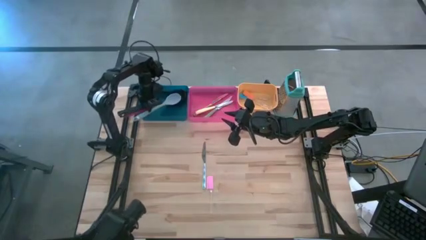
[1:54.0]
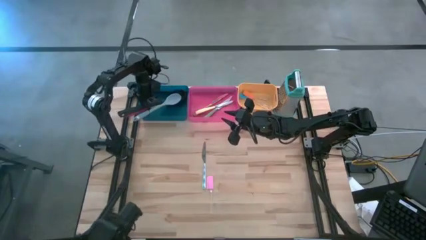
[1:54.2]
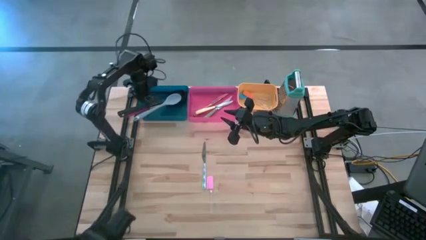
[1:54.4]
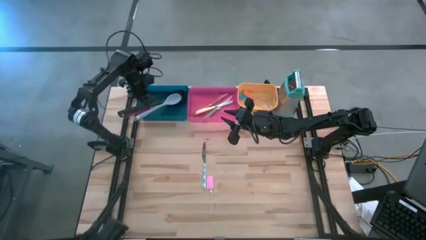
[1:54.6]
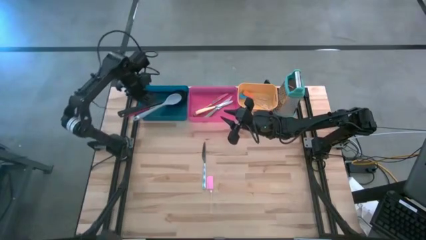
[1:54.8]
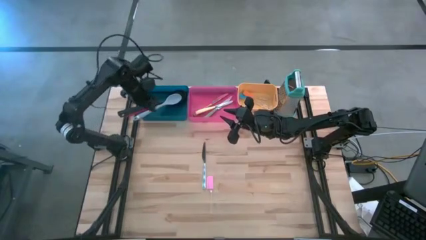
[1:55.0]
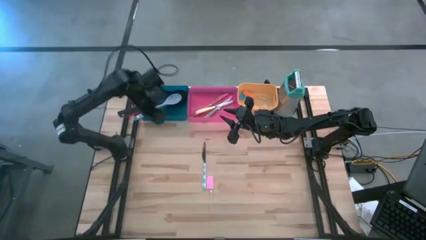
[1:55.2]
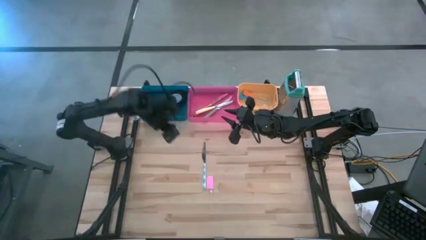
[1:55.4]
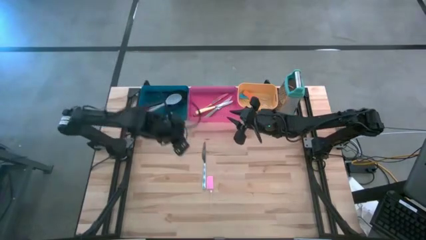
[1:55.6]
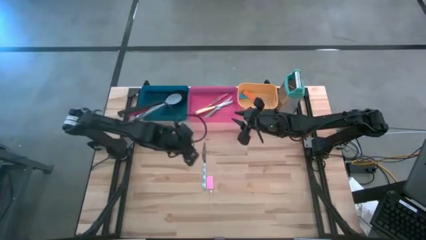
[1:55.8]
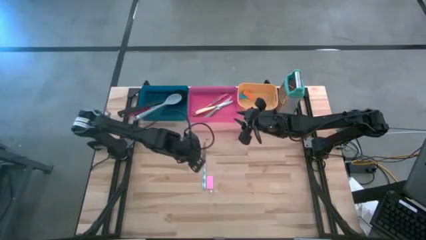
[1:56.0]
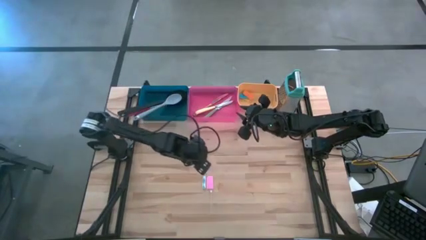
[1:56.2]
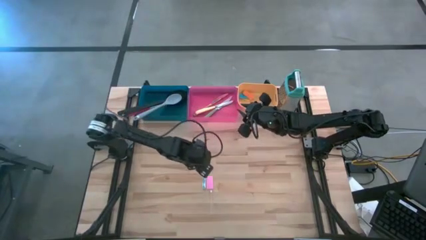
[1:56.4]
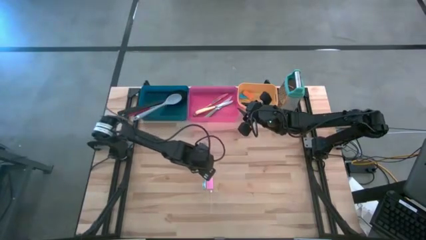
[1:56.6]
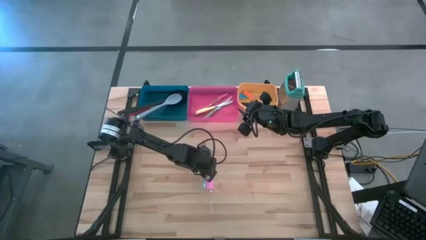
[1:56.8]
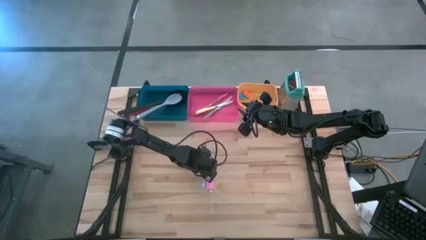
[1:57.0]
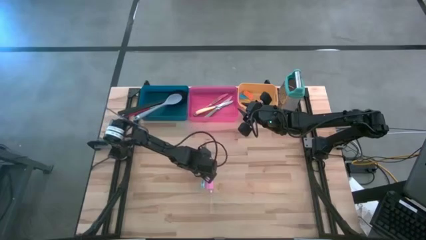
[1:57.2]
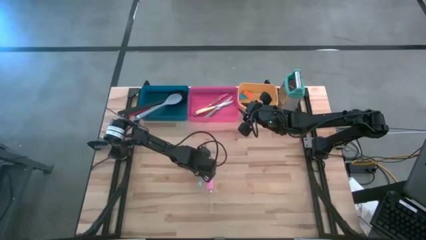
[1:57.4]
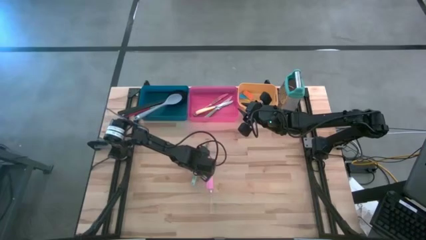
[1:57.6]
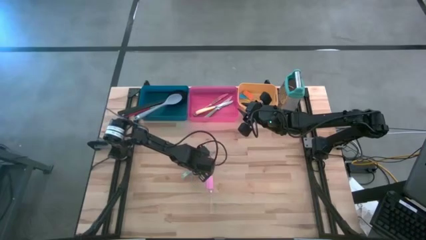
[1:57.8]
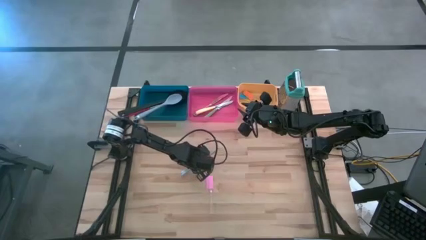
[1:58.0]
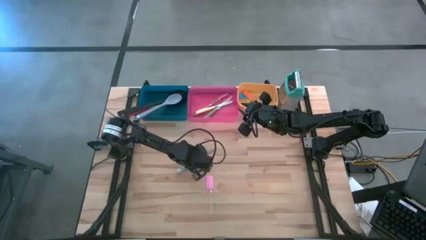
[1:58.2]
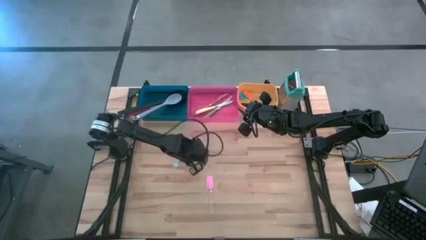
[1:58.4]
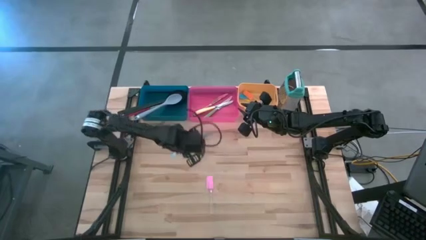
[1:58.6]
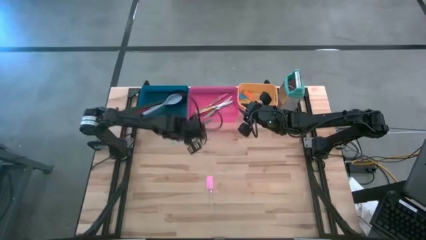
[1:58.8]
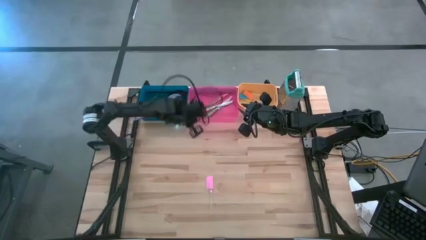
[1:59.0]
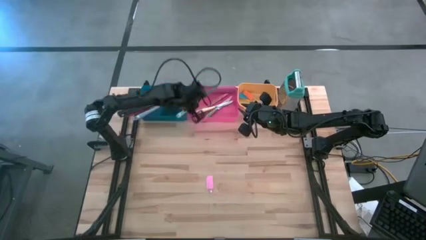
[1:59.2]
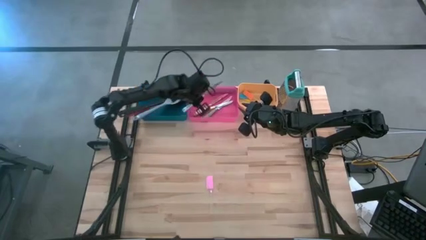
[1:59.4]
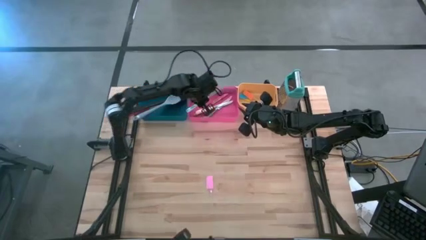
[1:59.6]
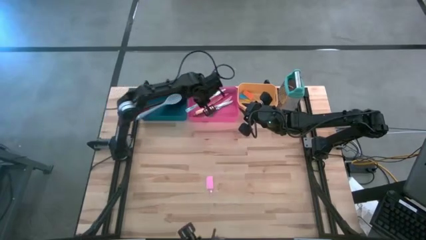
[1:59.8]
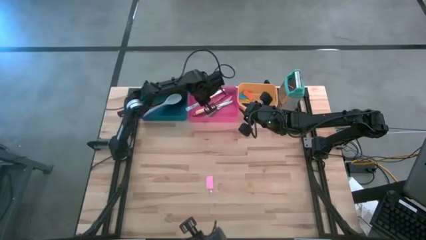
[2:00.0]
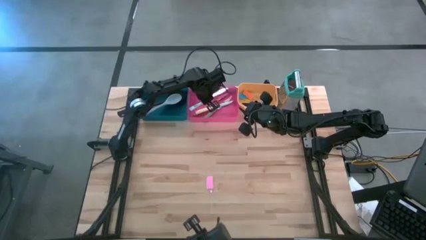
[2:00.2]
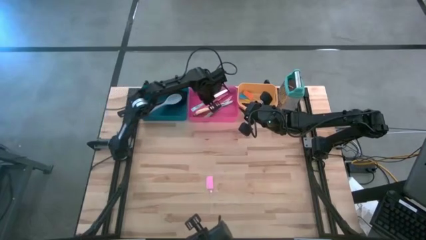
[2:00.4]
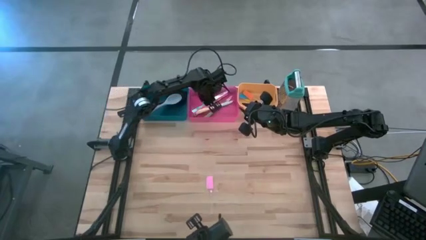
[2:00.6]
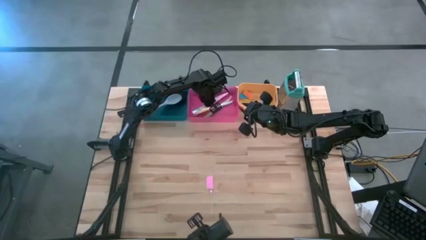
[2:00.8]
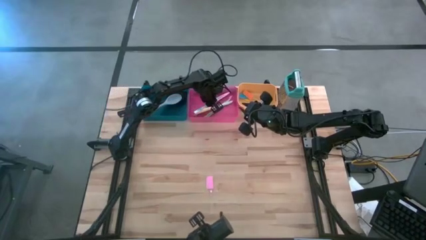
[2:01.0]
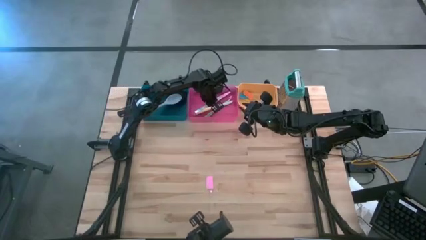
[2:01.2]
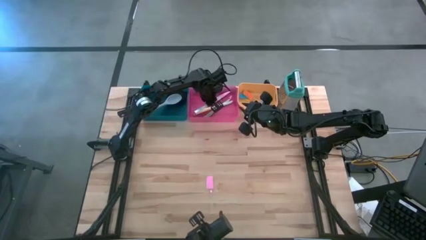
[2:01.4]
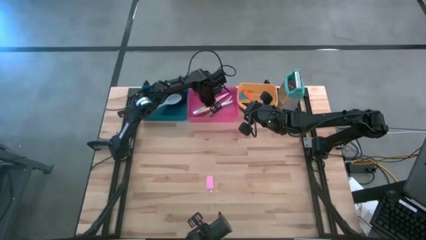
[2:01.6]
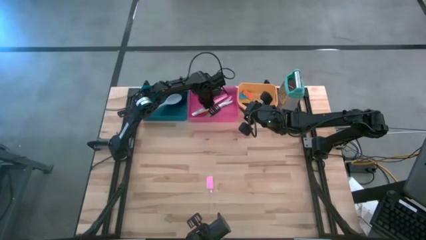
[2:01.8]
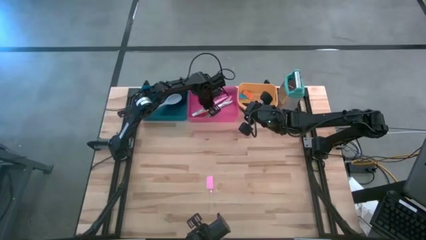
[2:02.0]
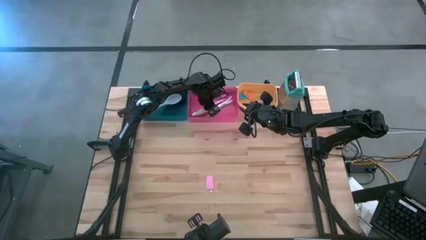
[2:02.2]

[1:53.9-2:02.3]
Task: Pick & Place Kitchen Items
Put the blue patterned knife into the pink bin

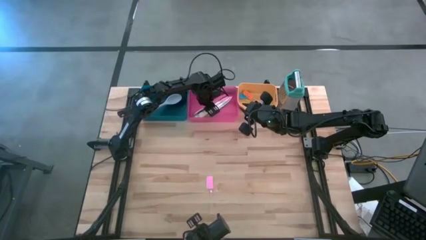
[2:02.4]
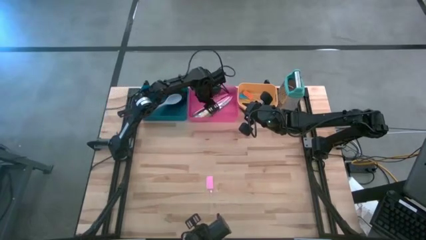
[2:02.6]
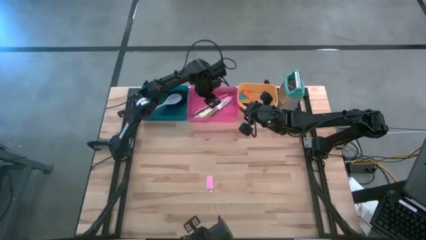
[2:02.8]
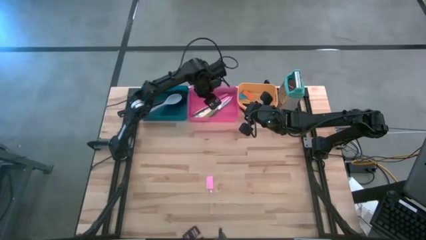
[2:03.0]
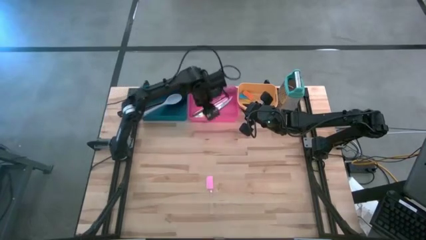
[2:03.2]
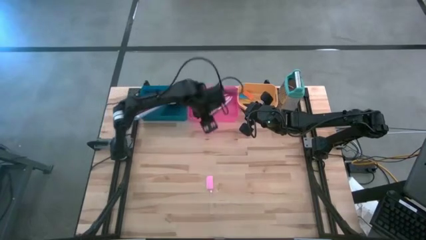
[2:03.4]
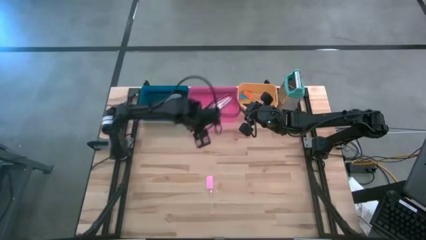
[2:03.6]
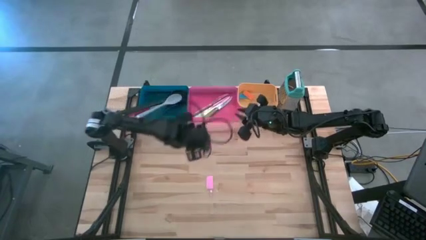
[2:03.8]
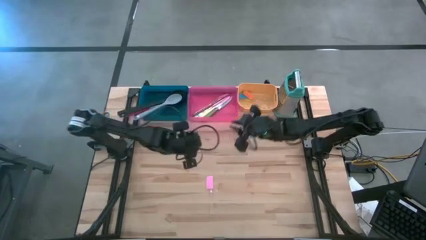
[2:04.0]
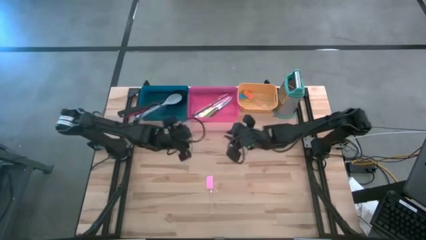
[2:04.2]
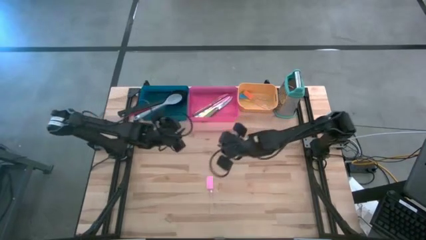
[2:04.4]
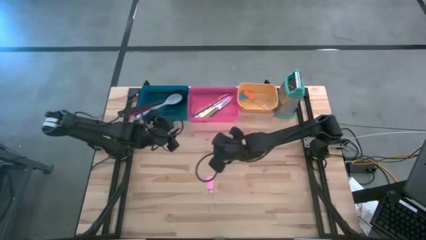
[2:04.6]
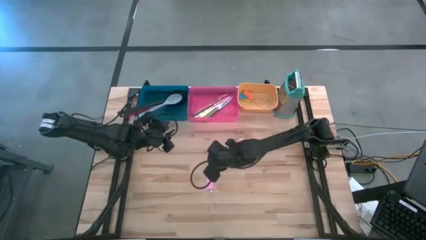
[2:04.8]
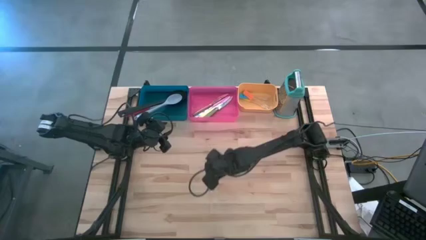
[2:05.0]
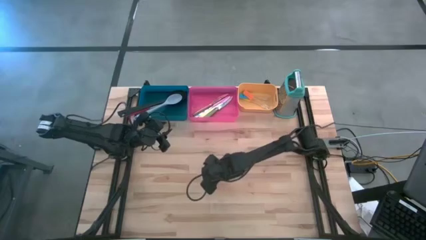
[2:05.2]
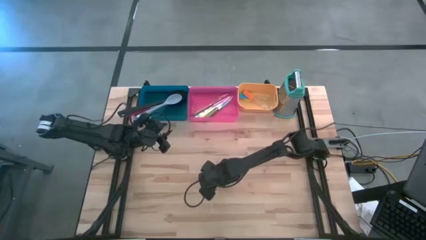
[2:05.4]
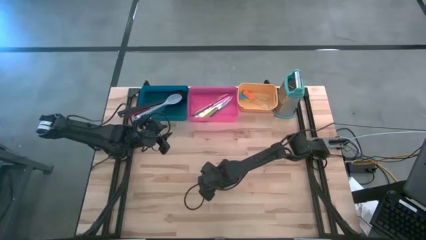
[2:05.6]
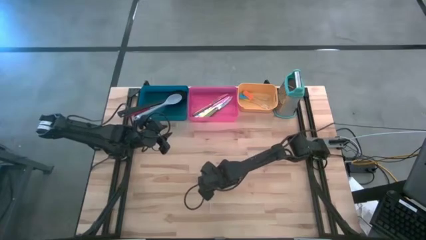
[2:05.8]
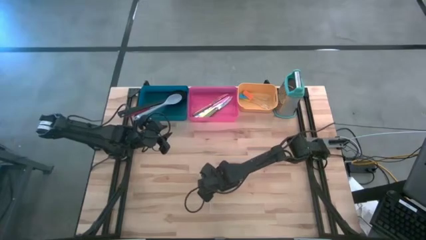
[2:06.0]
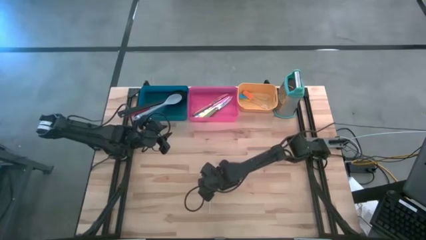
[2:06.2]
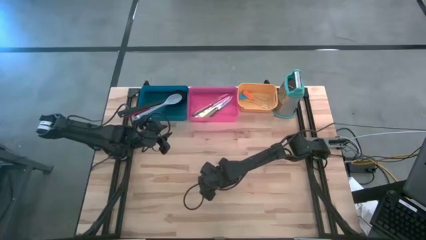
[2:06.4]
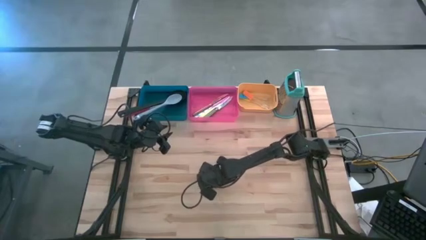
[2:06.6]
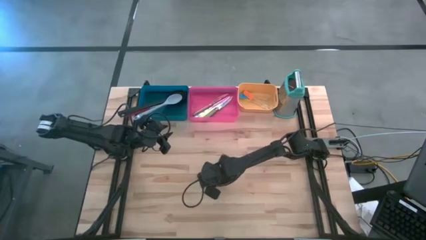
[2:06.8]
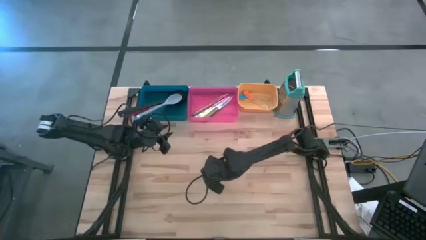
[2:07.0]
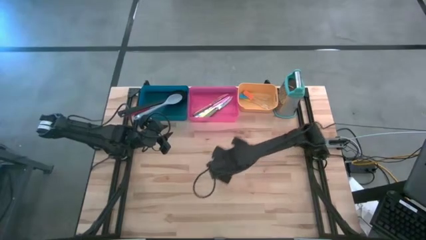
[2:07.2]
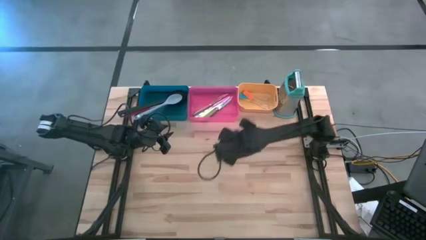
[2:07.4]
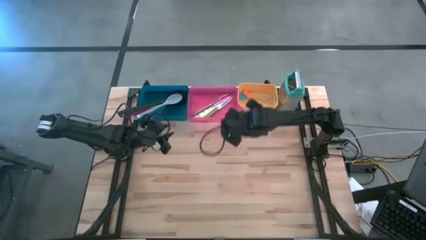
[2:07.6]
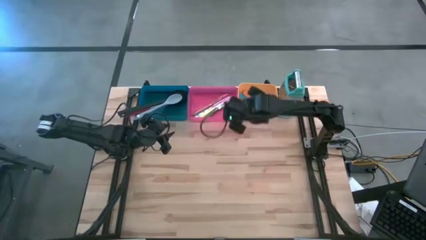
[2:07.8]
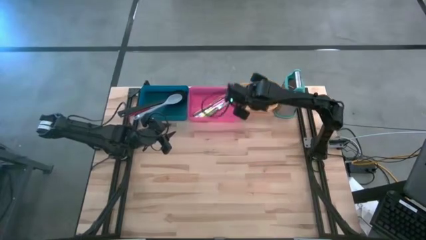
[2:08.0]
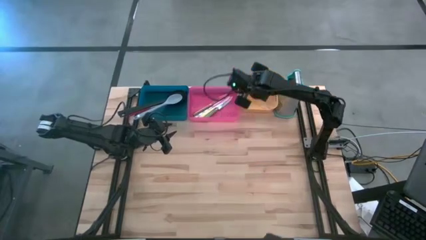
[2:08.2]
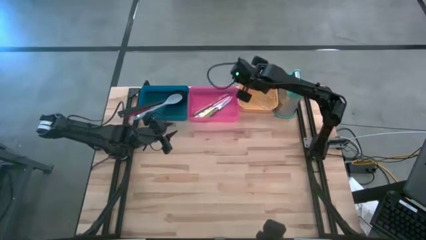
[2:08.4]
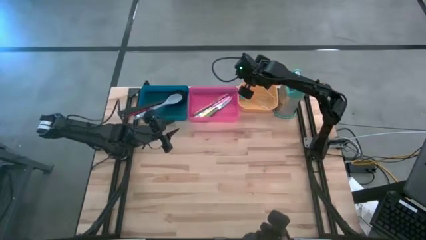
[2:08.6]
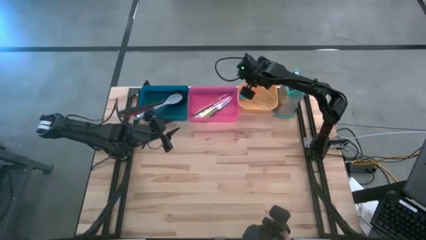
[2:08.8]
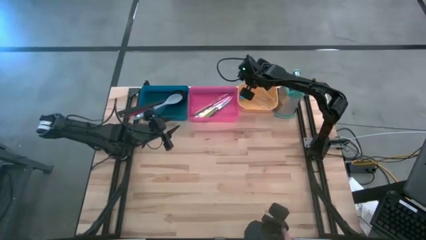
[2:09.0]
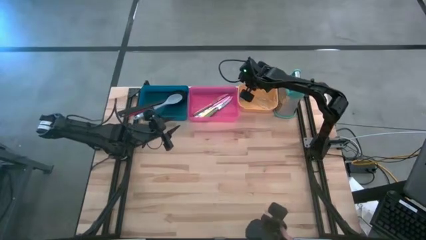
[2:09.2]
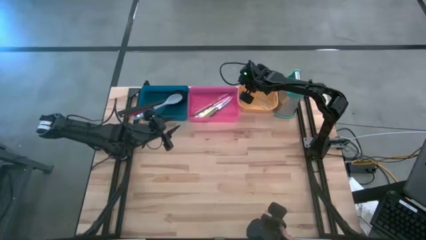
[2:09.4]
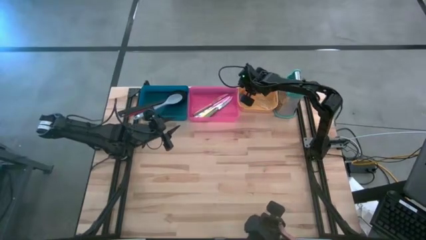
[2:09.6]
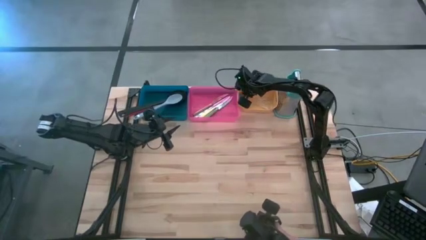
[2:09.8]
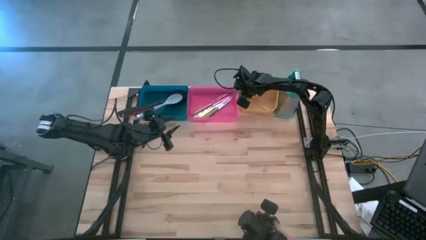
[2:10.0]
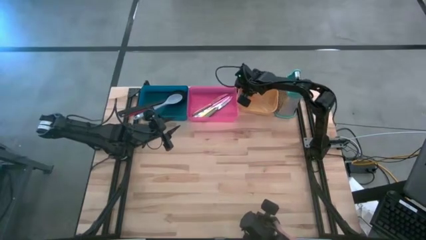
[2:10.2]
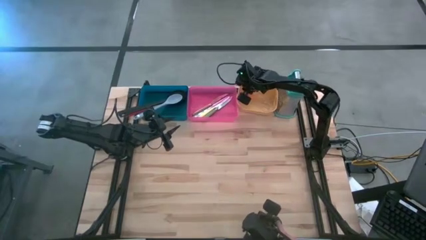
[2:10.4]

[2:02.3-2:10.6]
Put the pink spatula into the yellow bin
